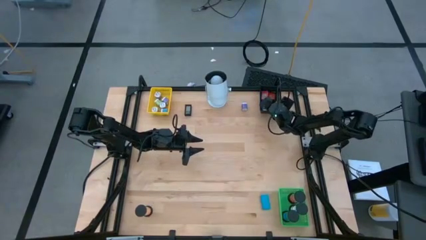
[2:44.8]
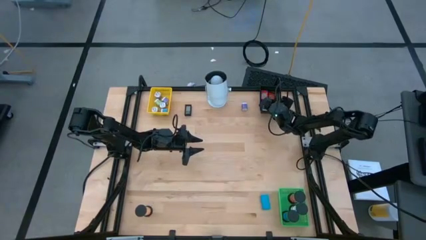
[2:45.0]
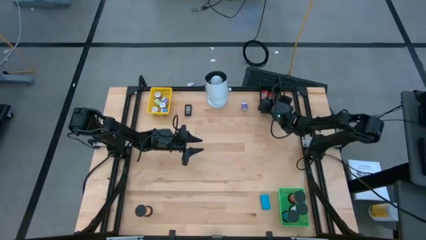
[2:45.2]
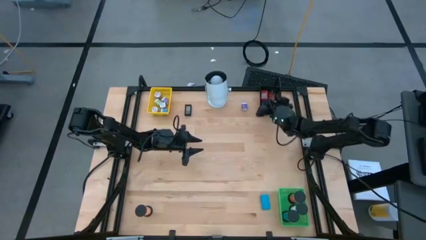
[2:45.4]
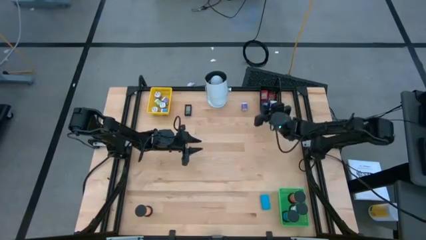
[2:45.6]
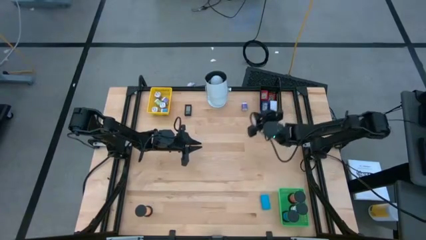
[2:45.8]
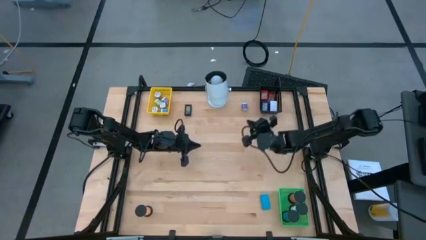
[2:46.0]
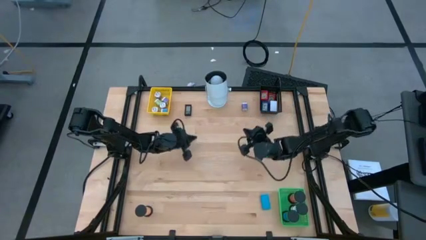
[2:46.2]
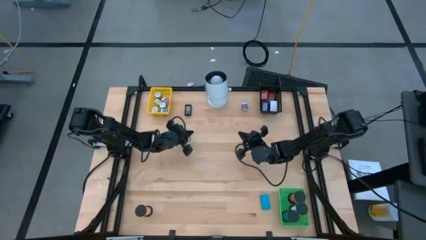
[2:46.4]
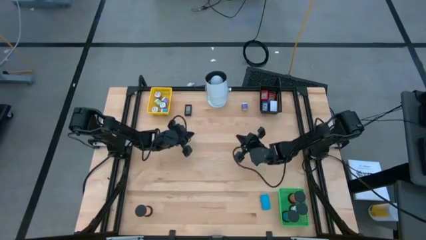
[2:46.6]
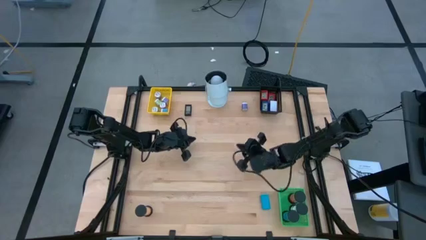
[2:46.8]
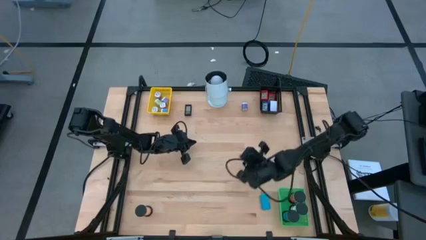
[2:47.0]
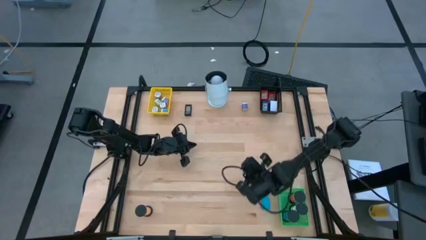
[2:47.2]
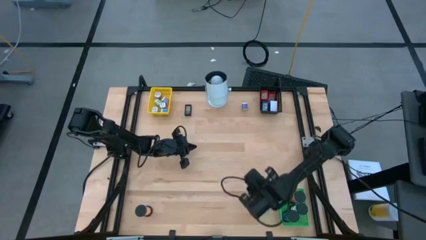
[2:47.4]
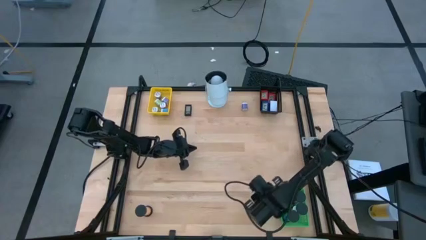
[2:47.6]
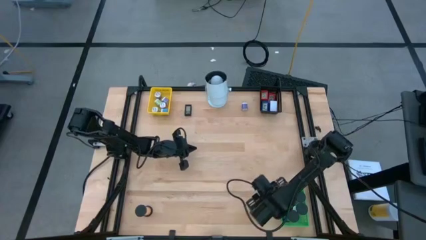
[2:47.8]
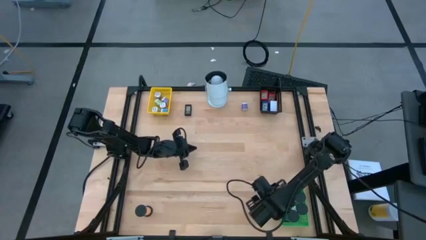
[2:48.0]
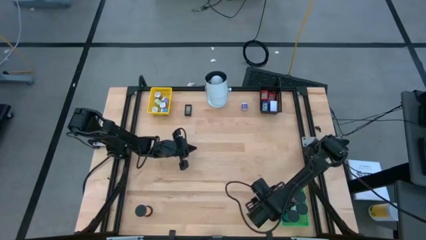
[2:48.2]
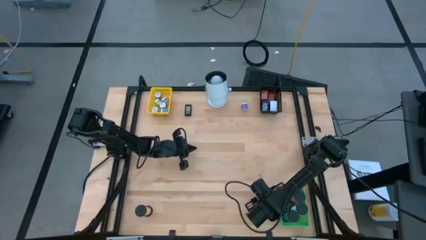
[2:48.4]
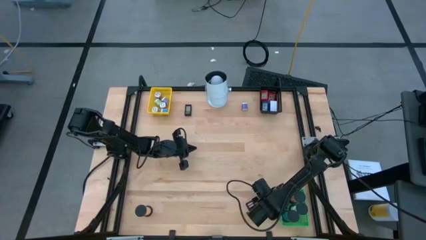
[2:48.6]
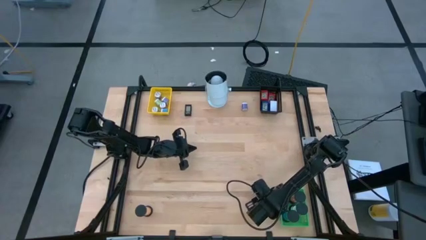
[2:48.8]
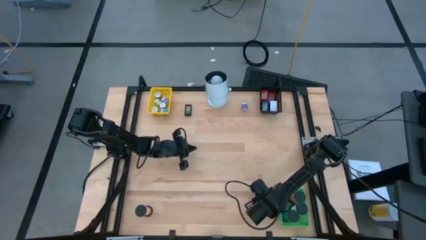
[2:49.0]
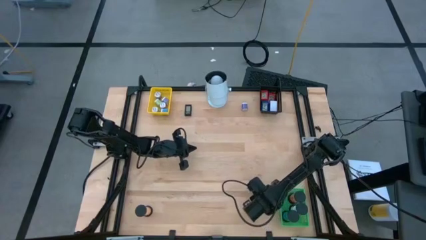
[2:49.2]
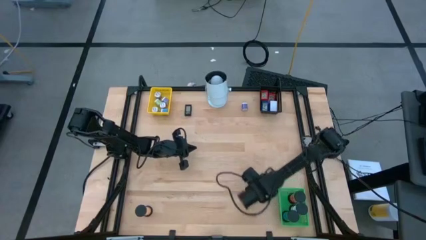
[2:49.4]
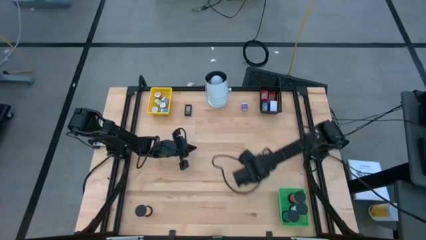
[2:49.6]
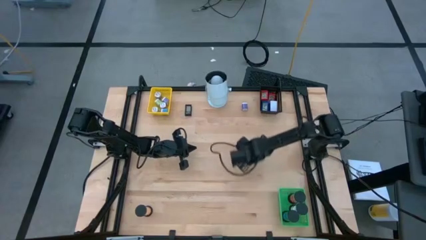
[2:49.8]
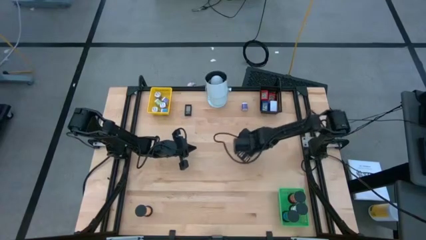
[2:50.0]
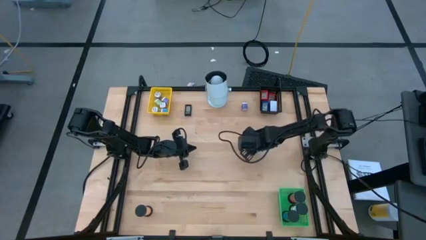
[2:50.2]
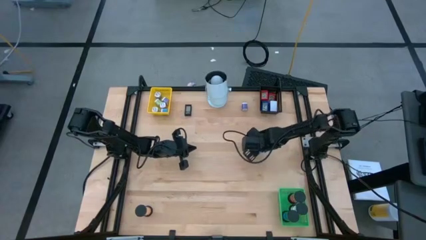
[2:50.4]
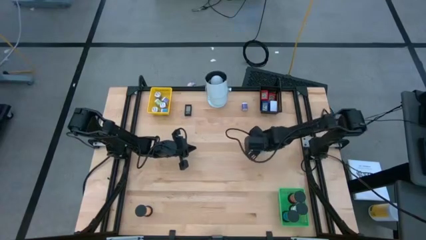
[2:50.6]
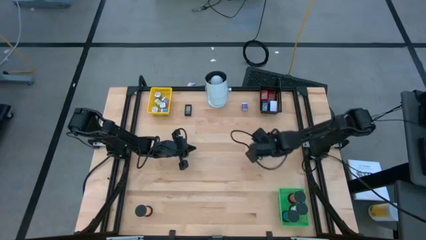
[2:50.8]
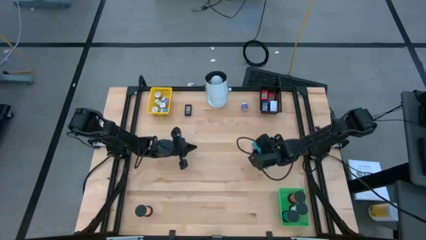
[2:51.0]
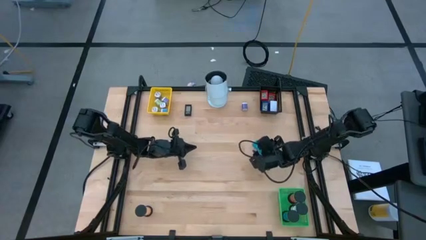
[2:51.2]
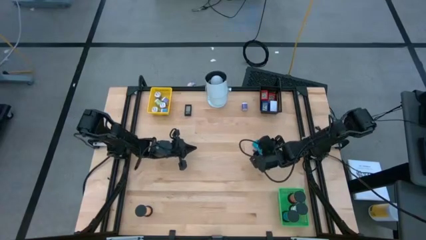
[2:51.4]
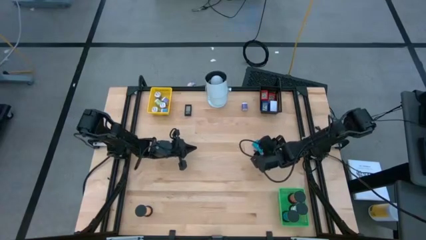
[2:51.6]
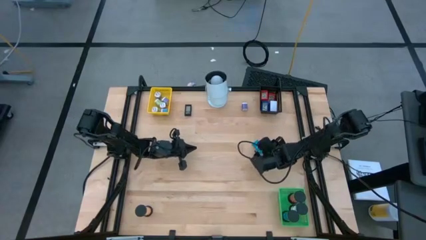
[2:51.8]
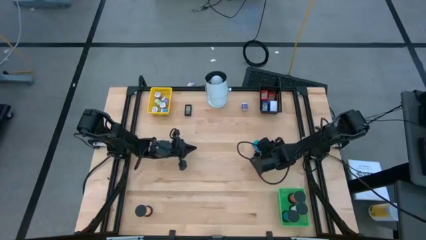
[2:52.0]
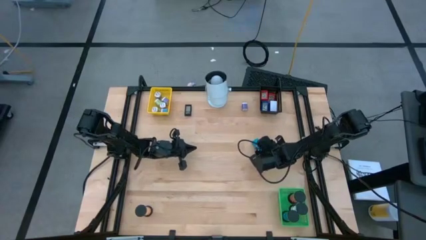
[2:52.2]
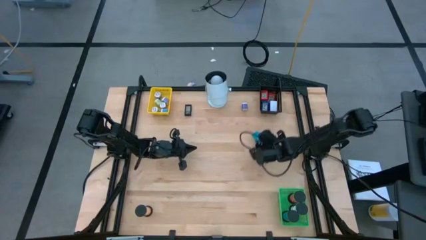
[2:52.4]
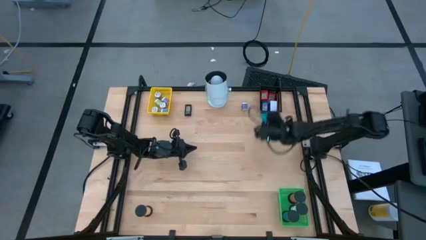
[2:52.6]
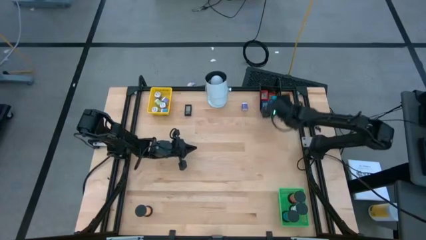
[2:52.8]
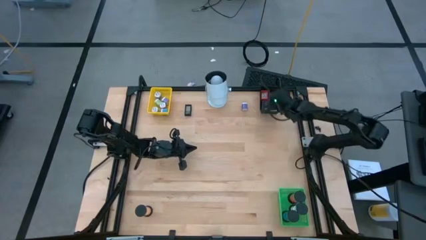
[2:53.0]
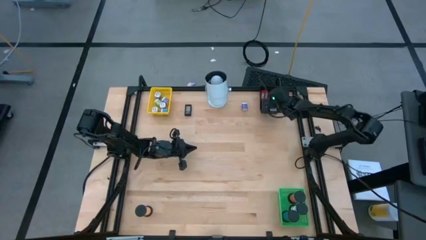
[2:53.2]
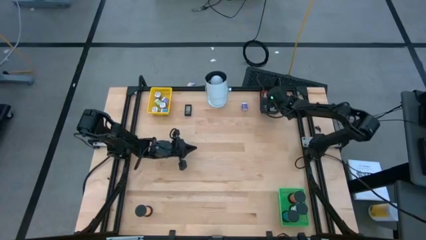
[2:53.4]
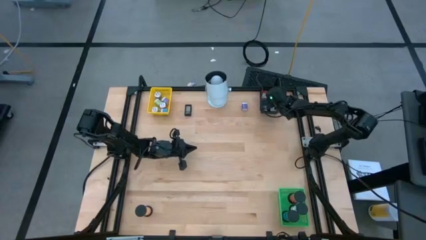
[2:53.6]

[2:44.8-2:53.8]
Task: Pick & Place Office items
Put the blue timer into the black bin

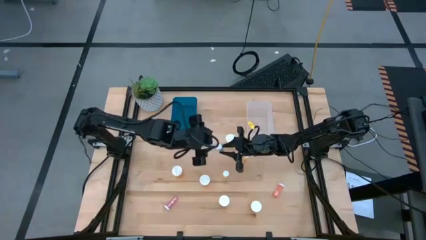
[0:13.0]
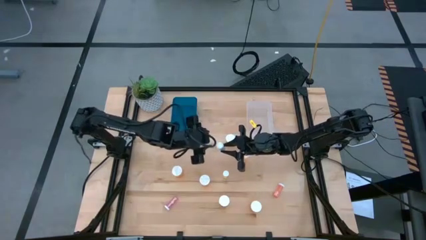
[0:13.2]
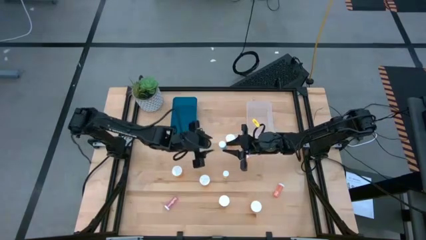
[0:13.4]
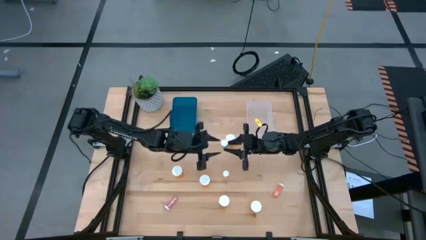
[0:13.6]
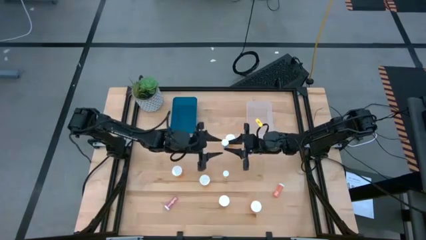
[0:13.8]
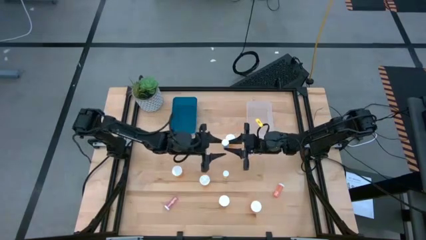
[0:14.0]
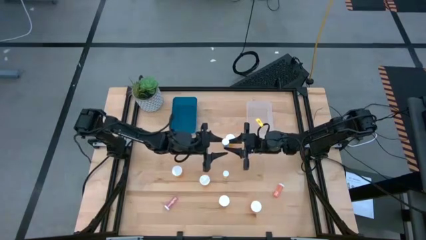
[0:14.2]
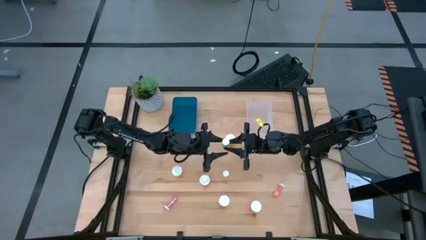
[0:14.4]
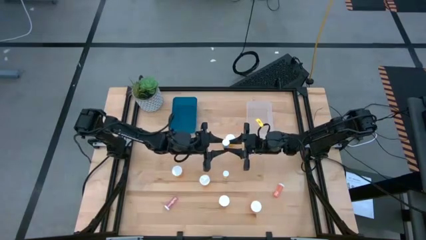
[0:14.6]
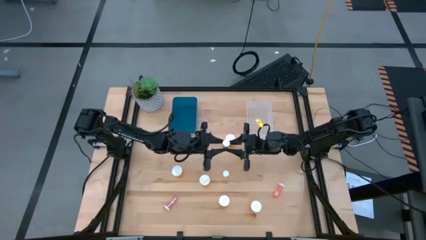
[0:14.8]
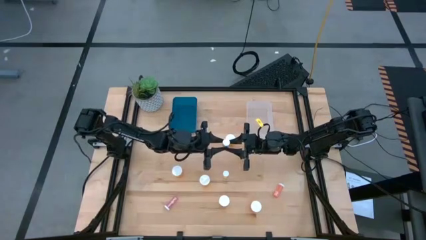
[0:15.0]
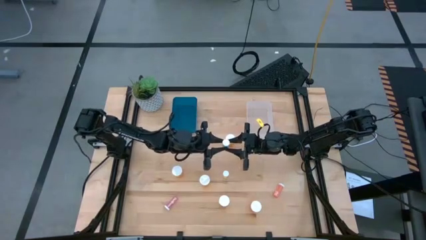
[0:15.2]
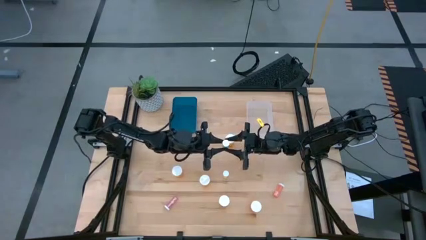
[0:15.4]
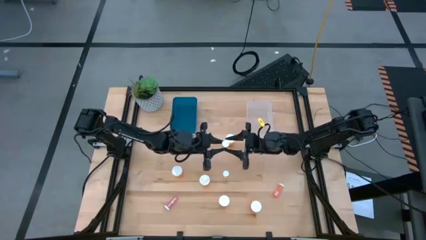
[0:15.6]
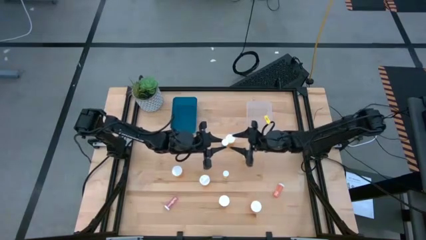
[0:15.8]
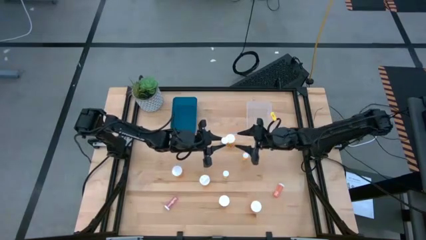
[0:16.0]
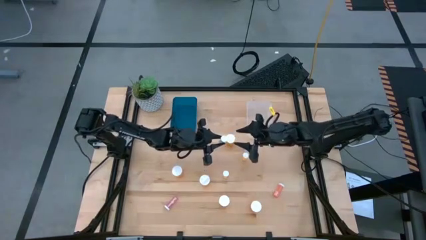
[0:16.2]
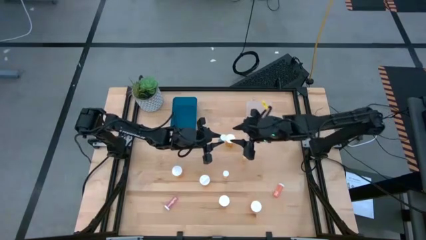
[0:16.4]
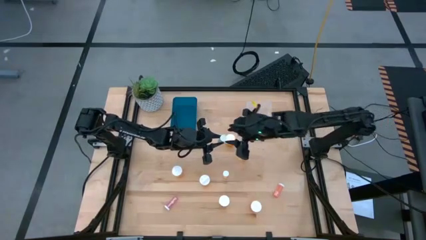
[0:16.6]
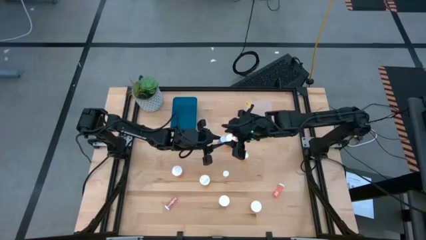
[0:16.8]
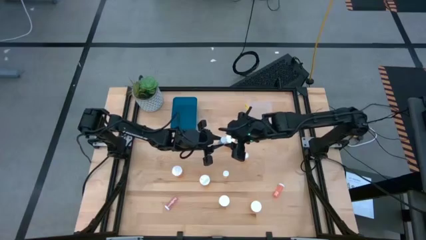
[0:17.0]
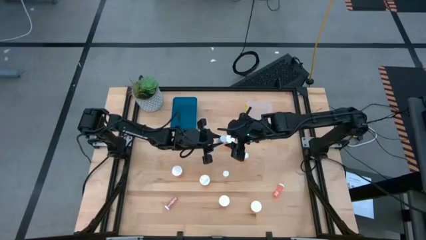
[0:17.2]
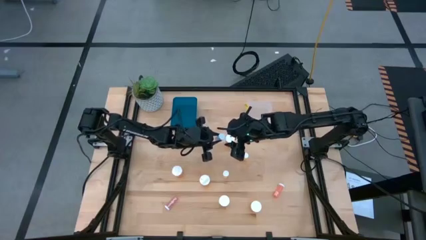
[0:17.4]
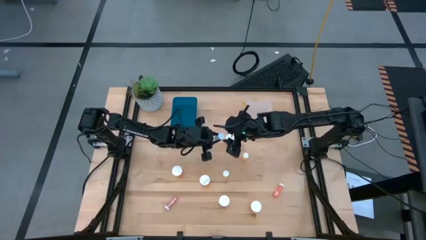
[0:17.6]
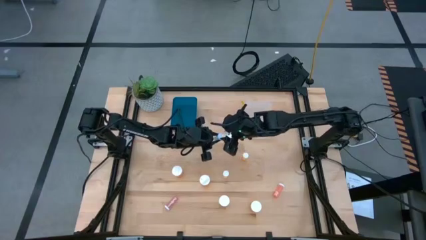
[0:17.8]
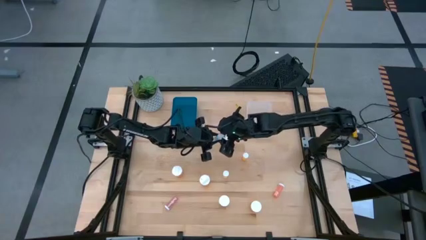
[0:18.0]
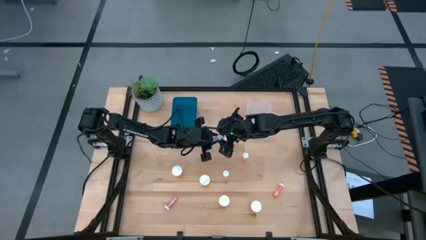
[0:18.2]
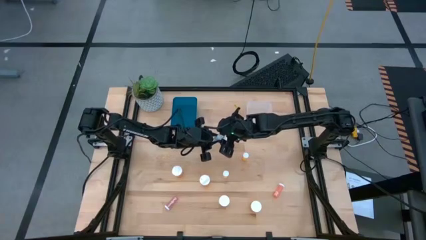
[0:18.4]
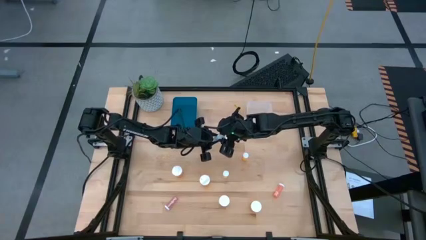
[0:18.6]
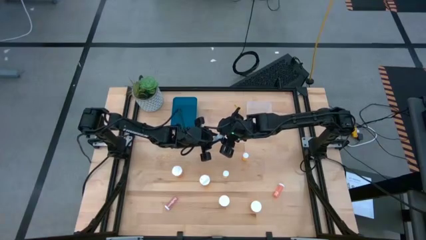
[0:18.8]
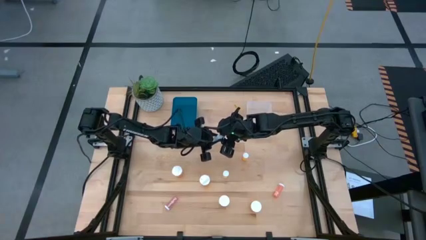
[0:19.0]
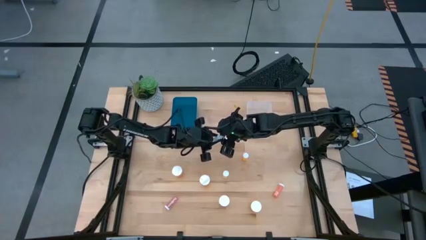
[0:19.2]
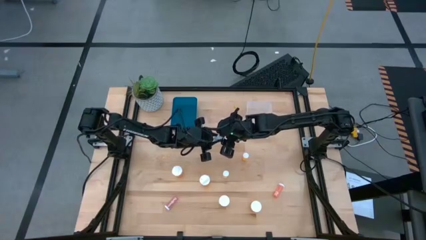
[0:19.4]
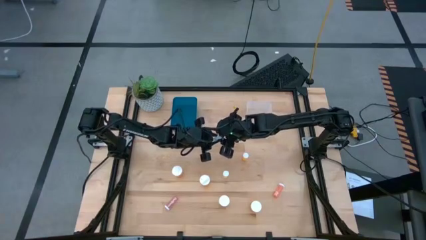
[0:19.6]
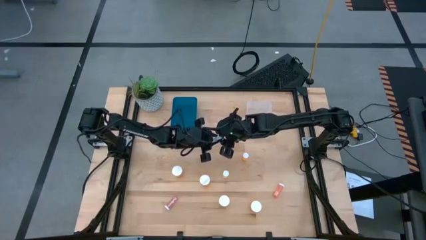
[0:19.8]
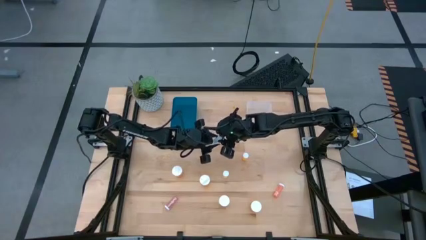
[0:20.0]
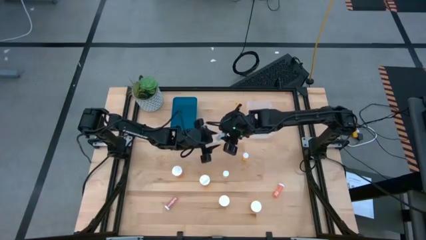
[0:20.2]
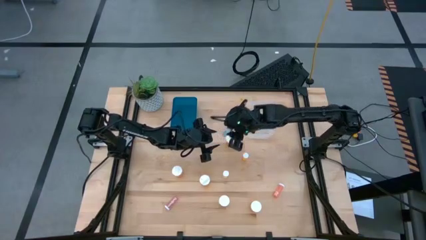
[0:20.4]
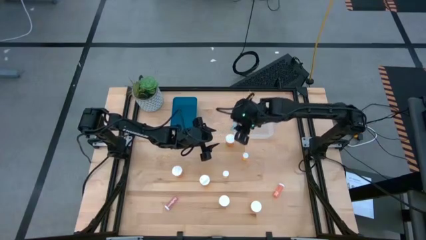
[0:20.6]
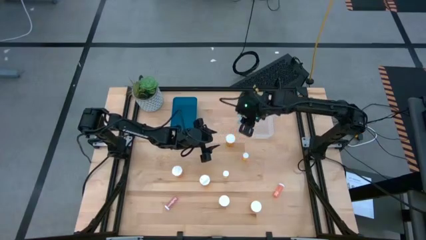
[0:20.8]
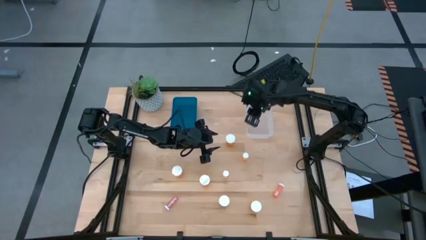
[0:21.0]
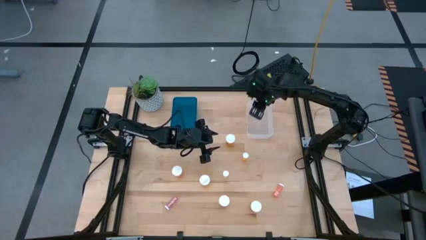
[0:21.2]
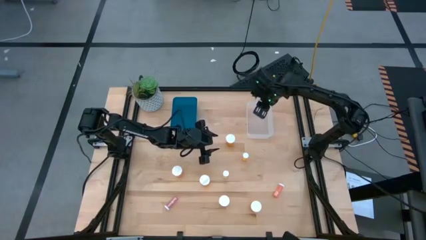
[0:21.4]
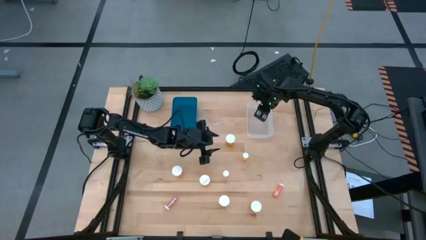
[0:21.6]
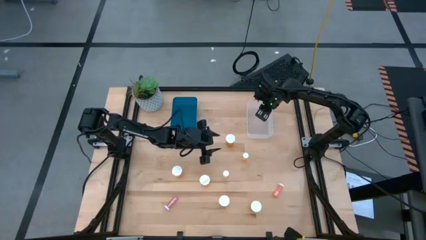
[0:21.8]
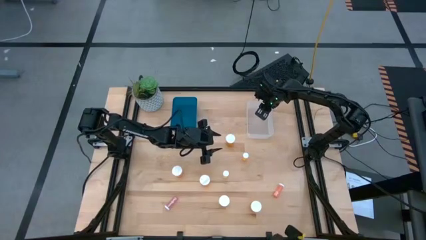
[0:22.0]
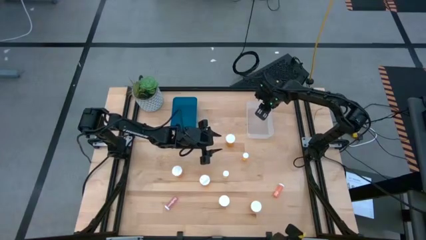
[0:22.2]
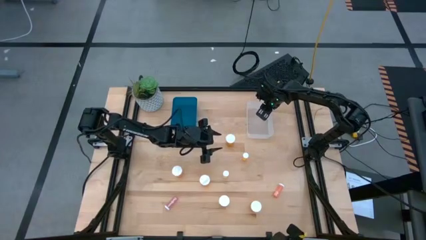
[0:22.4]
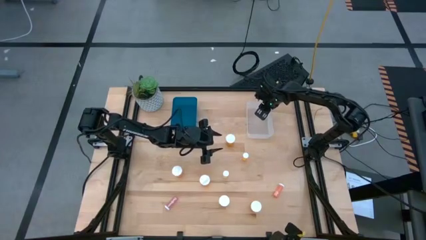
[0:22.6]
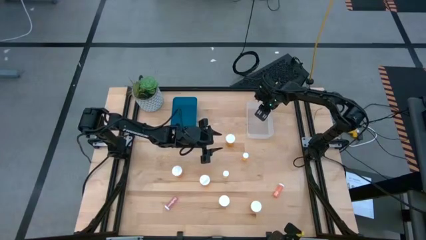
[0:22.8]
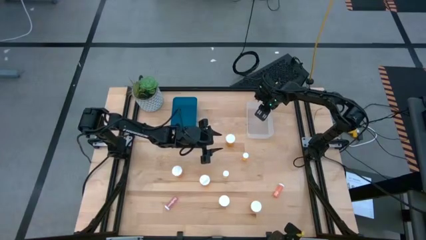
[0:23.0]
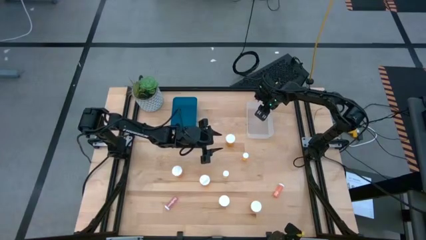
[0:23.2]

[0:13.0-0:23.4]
Task: Pick and place medicine bottles into bin by pill shape (circle, oval)
Put the small blue pill bottle into the transparent bin
